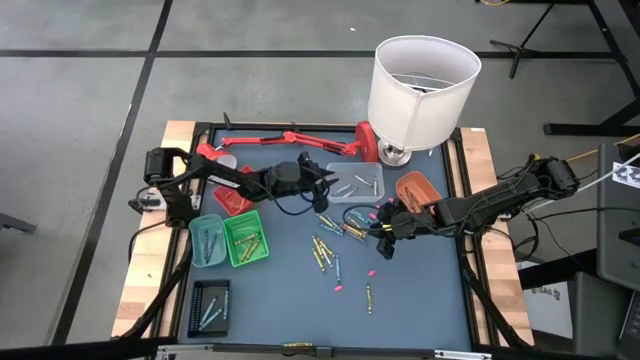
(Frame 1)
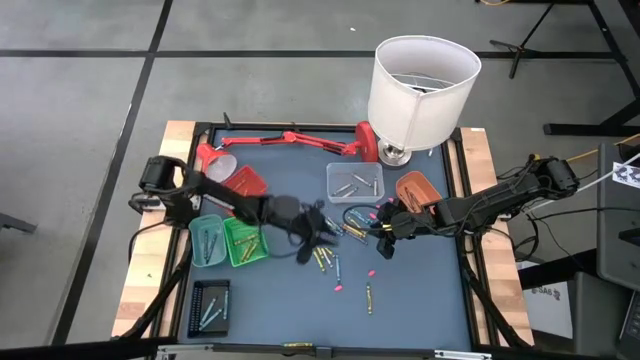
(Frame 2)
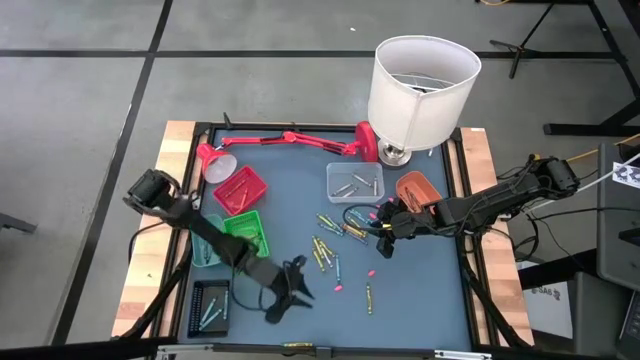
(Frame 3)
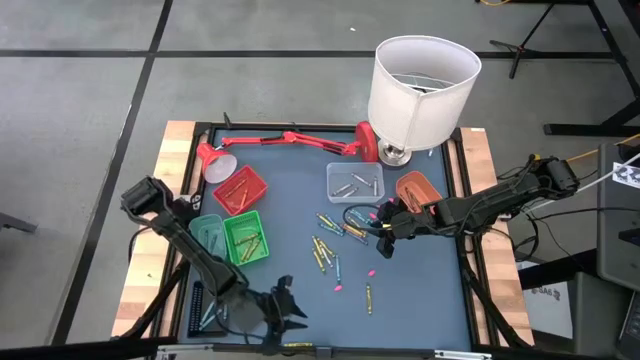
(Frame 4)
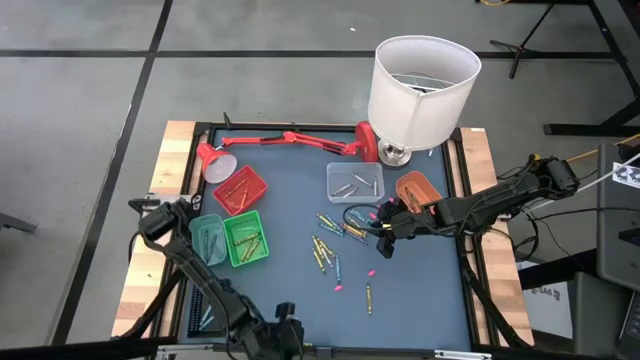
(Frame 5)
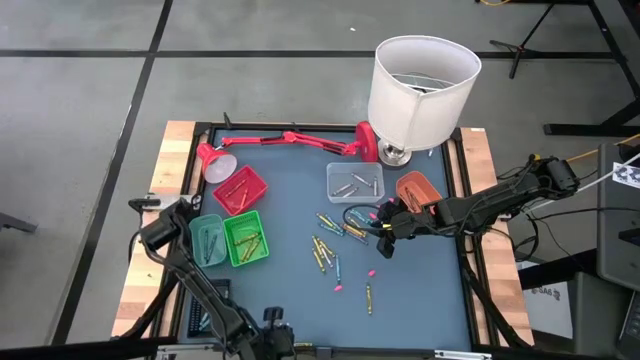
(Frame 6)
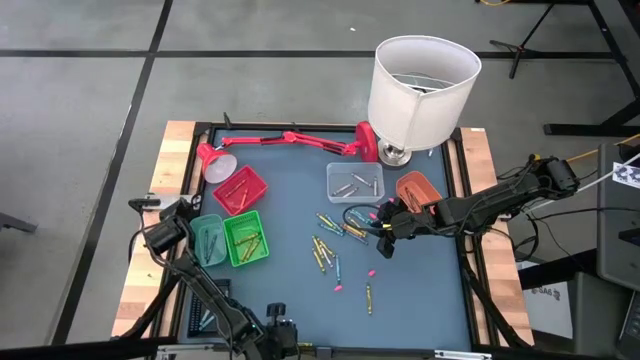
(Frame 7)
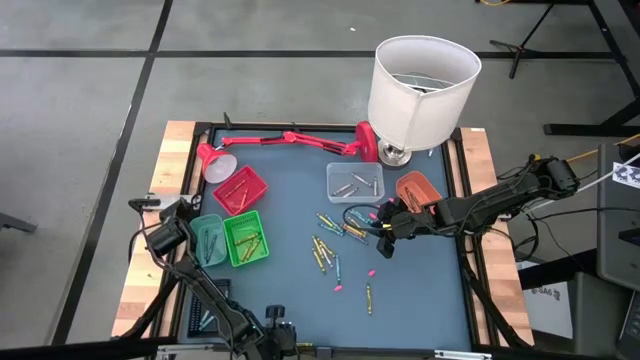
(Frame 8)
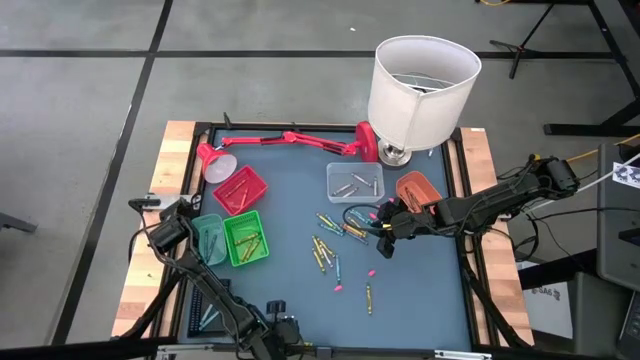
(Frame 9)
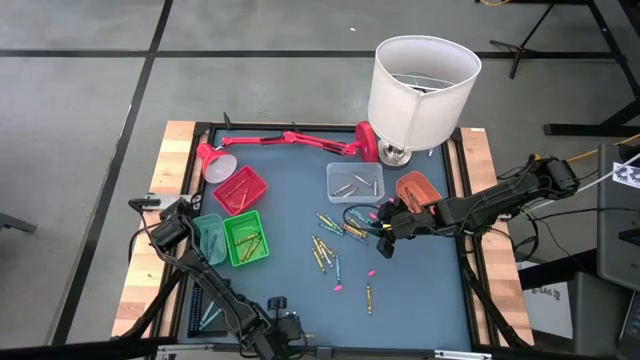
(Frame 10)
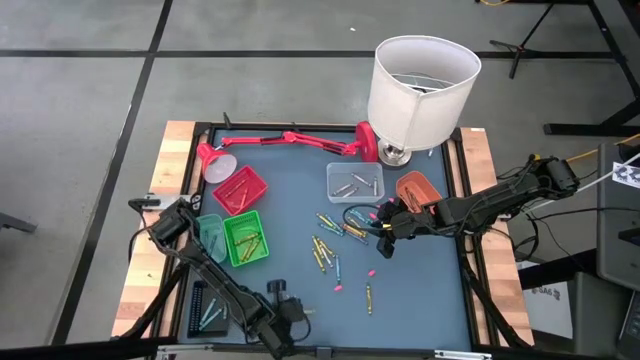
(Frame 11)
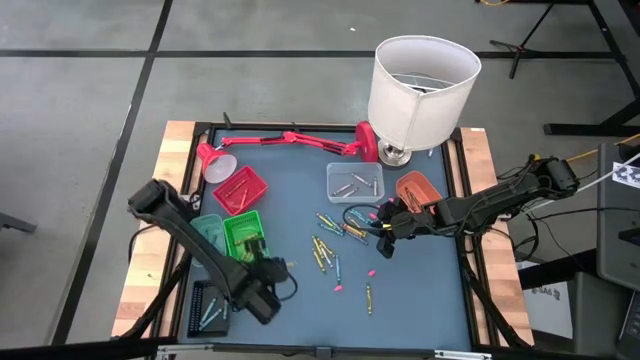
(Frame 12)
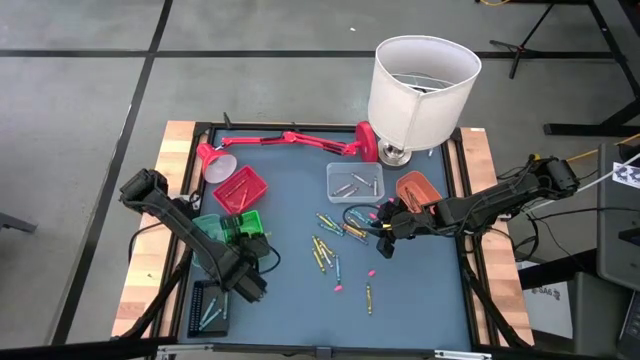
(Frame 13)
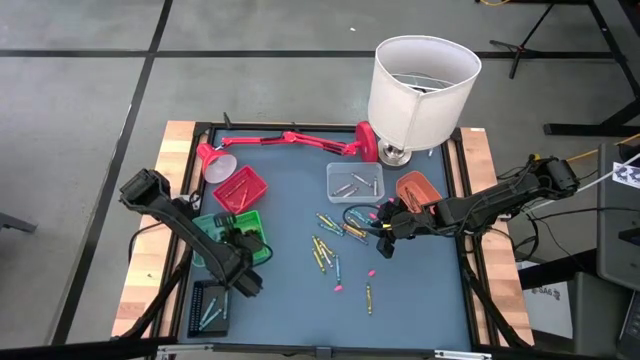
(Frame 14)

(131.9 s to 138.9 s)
Task: Sort crayons
Put the green crayon into the green bin

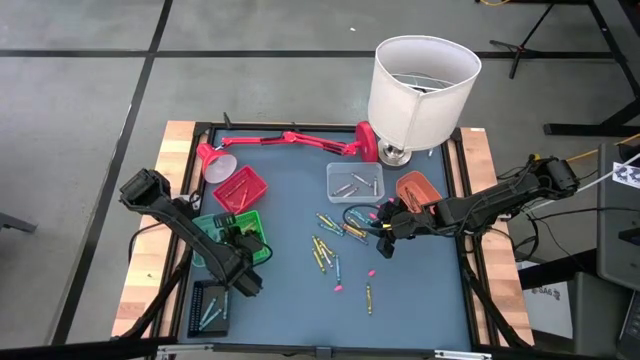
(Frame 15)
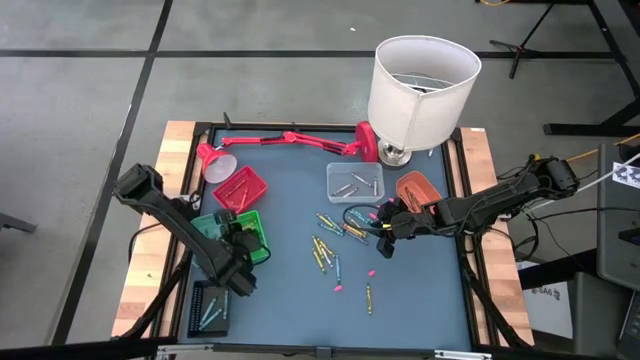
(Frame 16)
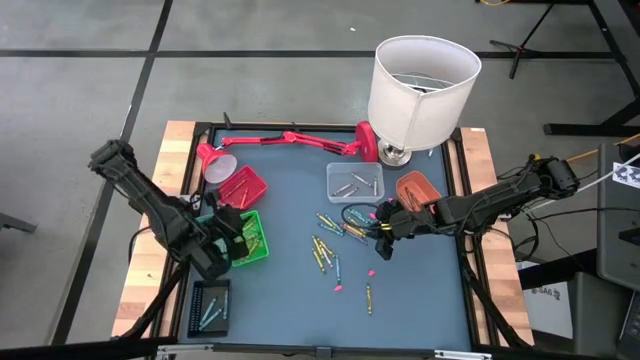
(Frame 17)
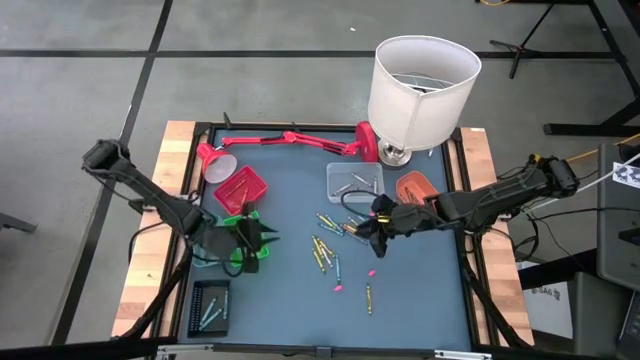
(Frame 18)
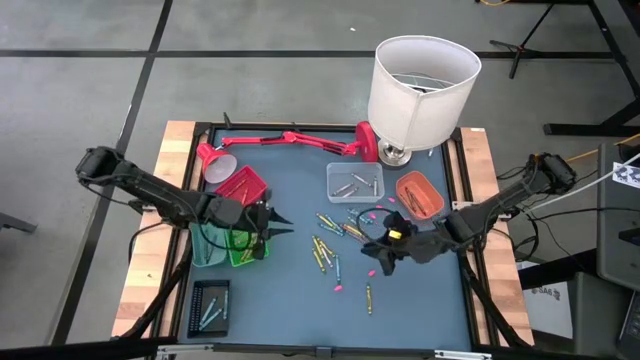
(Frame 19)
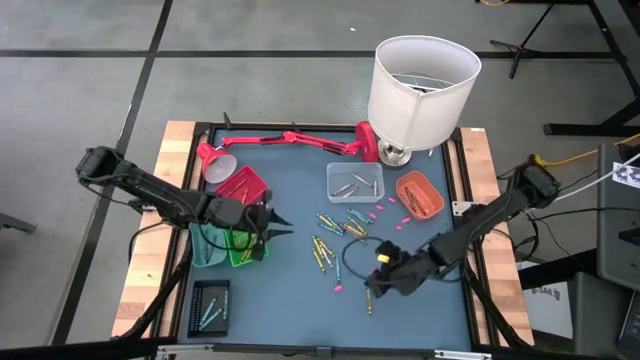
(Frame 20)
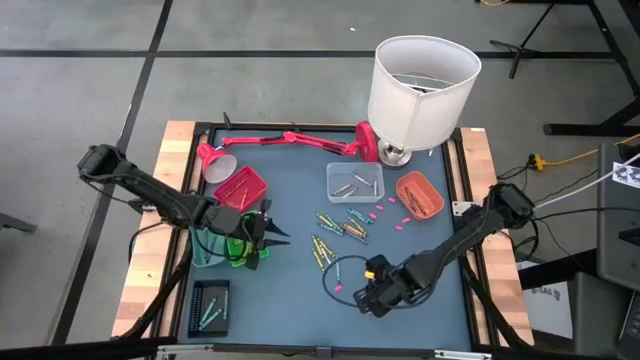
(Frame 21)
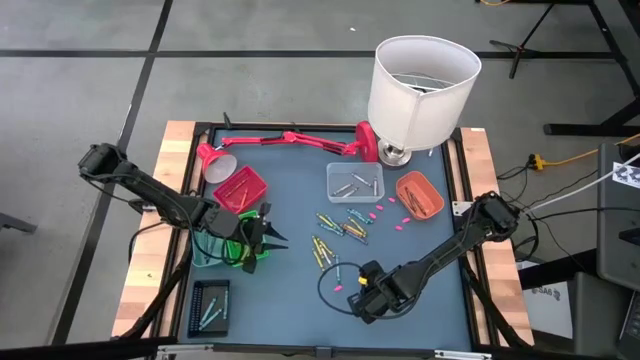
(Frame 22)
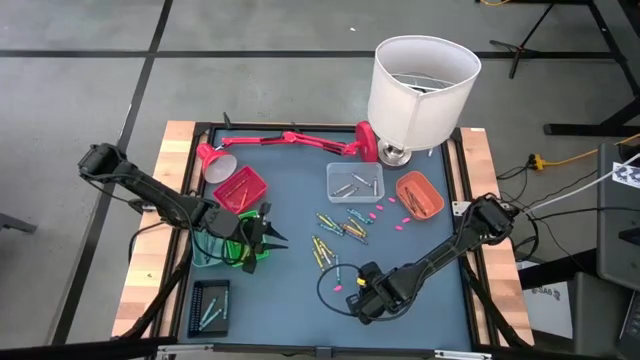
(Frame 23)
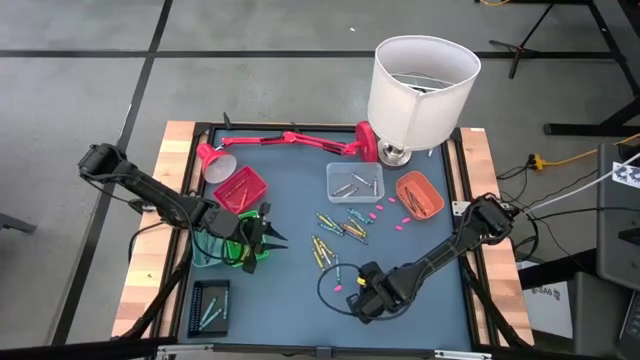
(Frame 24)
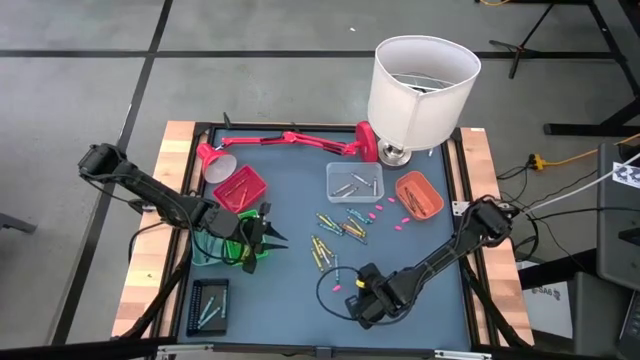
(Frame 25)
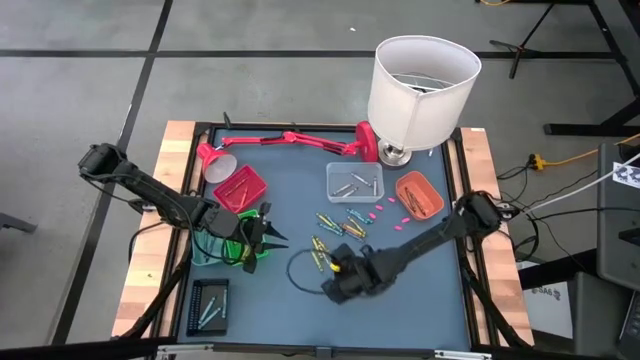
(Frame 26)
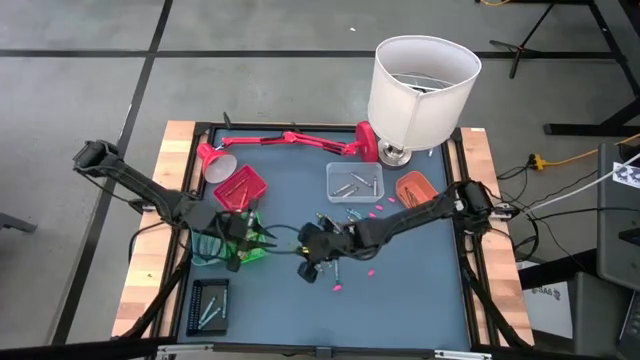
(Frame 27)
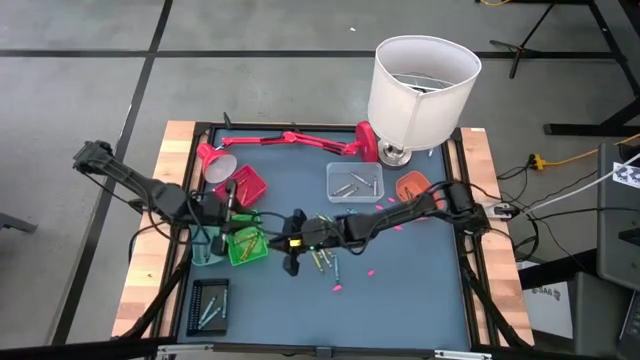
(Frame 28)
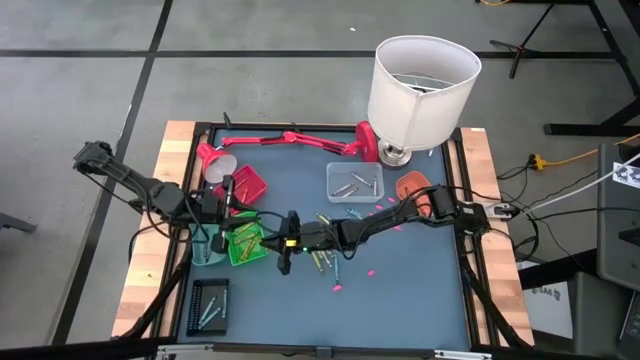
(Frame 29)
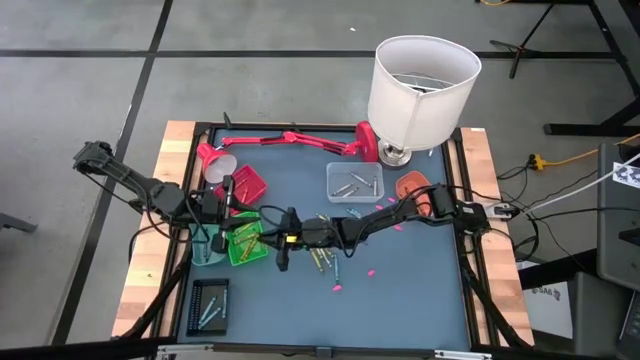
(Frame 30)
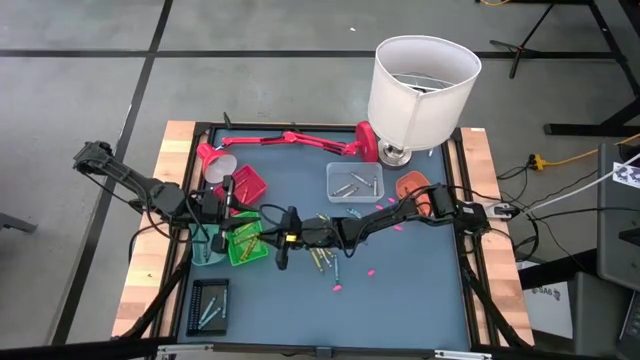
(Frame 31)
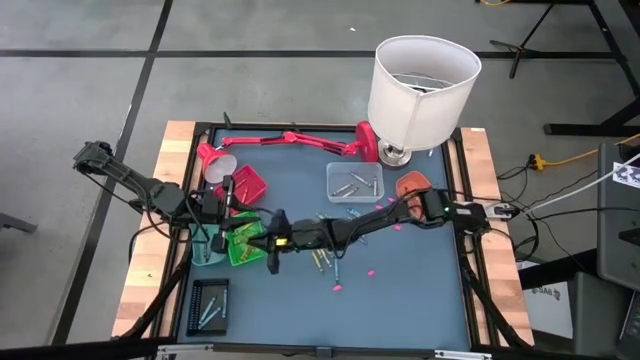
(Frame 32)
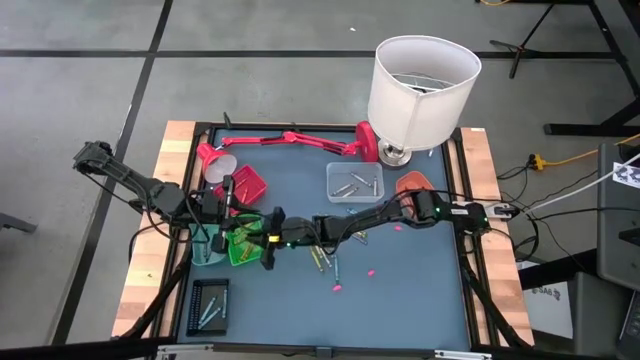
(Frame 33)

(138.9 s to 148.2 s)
Put the green crayon into the green bin

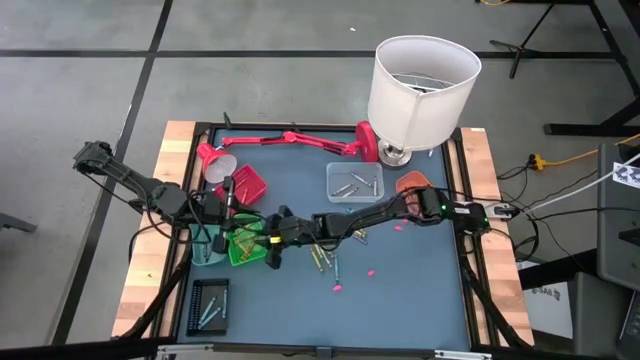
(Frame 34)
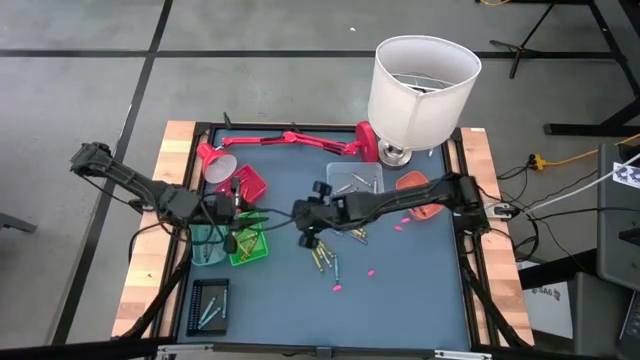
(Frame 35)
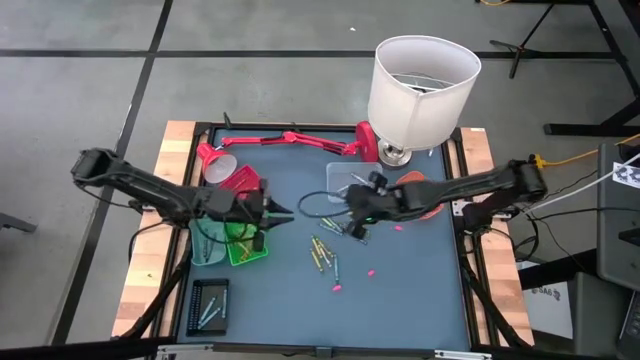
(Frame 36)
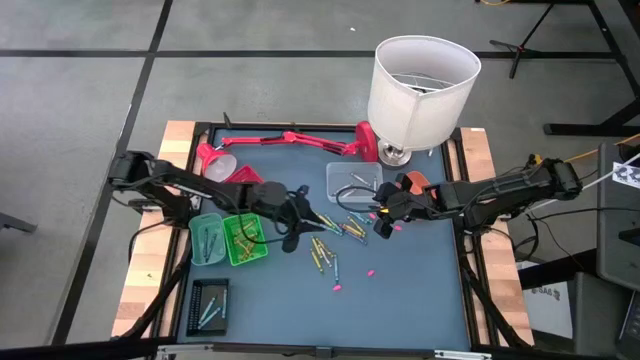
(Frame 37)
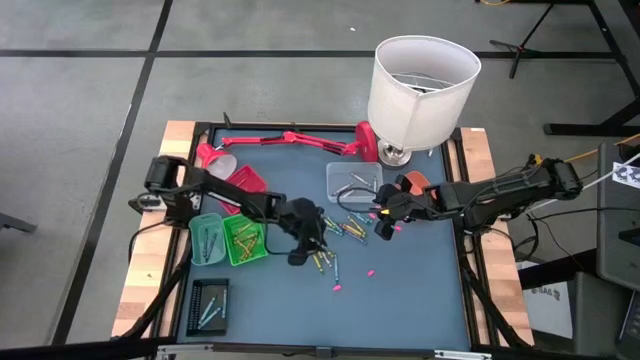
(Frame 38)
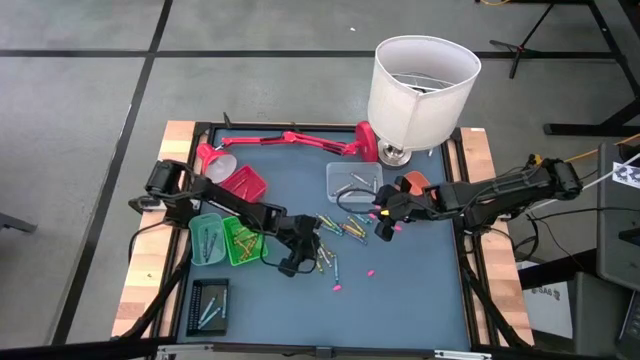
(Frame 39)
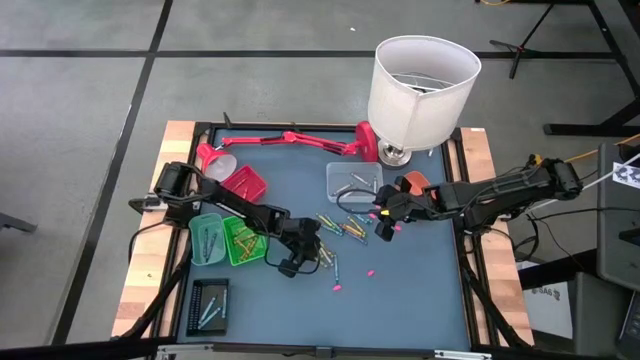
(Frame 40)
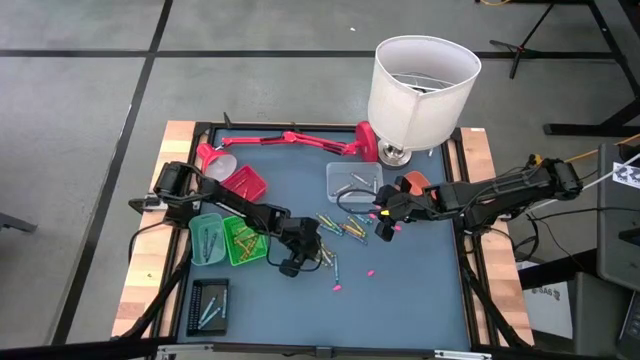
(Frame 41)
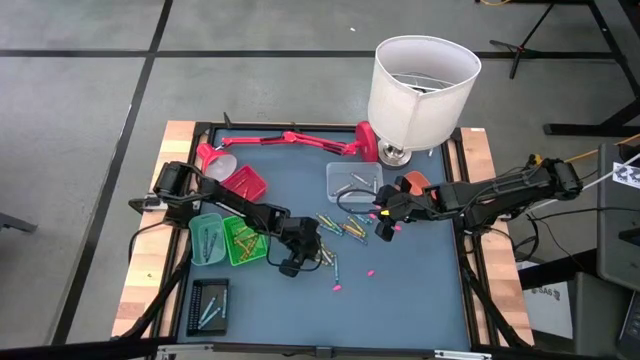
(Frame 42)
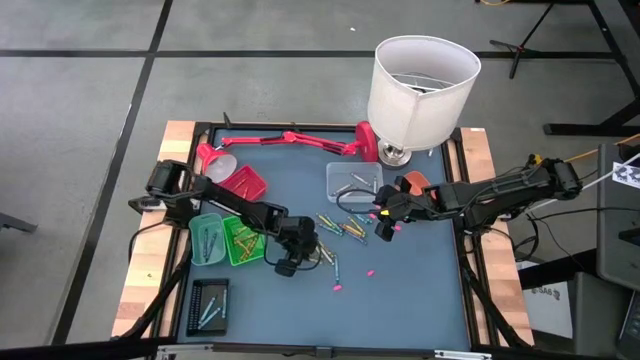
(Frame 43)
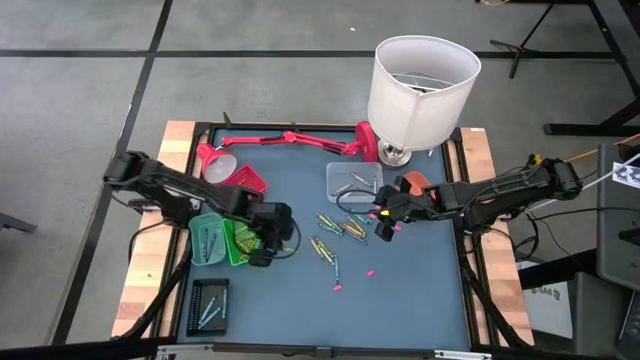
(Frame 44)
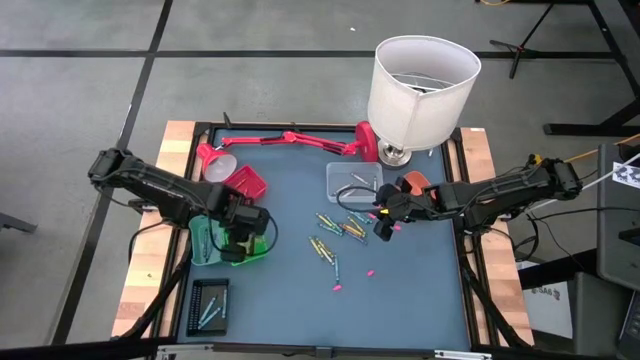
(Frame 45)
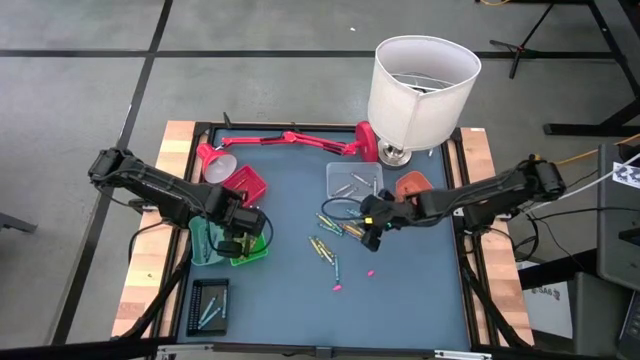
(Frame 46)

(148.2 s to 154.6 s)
Put the green crayon into the green bin
